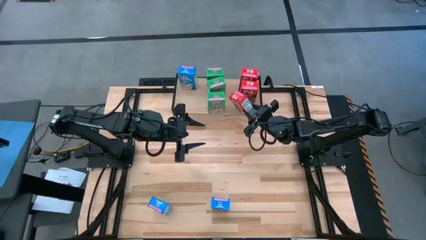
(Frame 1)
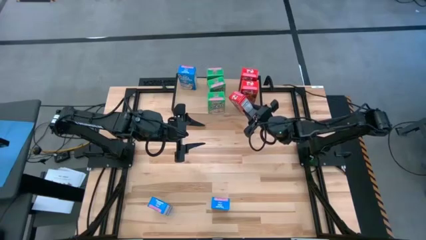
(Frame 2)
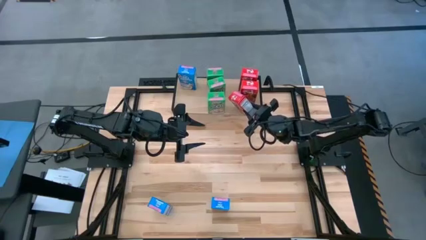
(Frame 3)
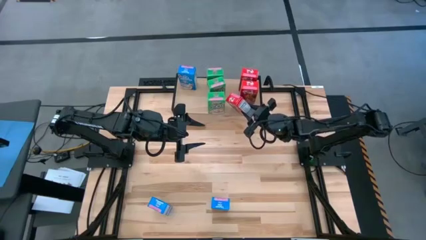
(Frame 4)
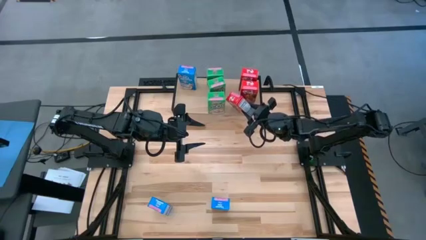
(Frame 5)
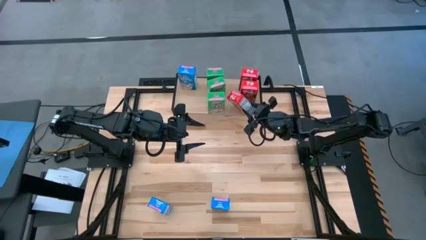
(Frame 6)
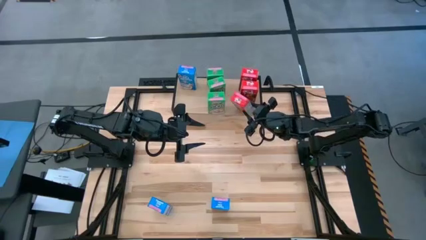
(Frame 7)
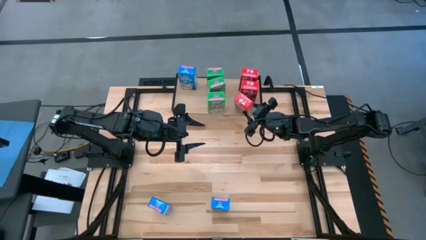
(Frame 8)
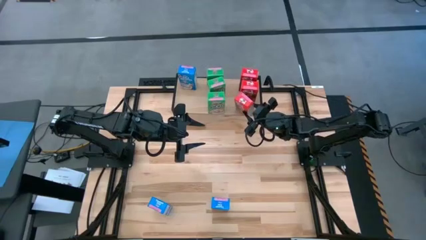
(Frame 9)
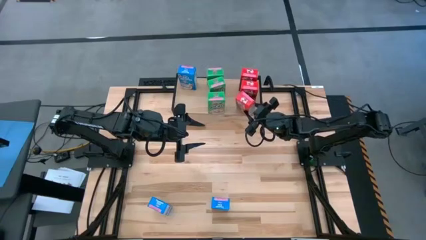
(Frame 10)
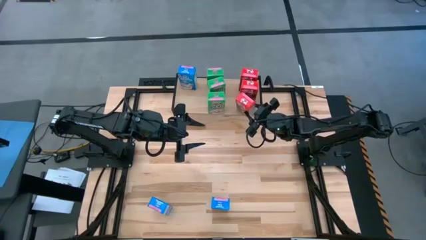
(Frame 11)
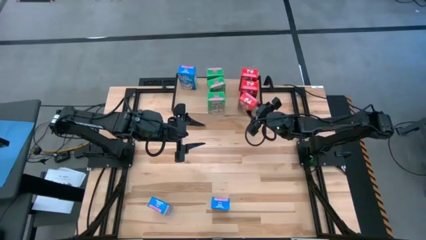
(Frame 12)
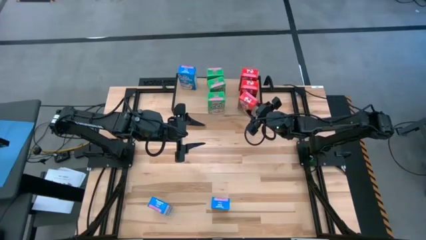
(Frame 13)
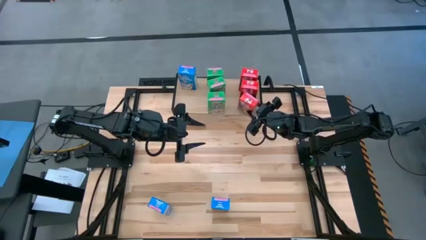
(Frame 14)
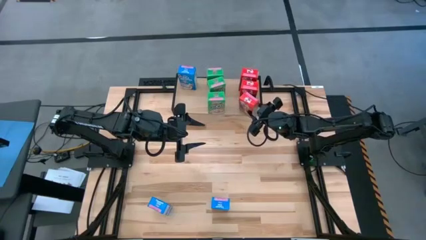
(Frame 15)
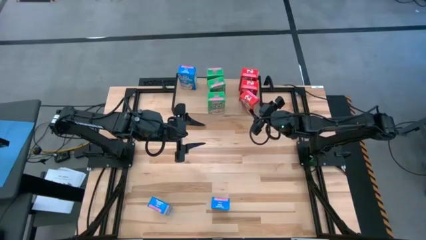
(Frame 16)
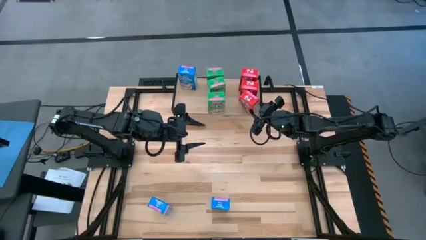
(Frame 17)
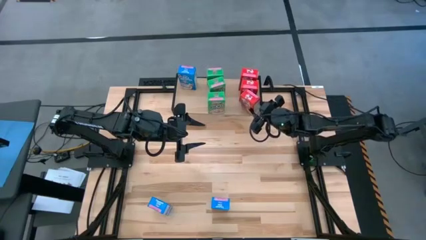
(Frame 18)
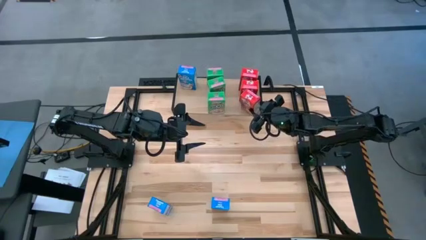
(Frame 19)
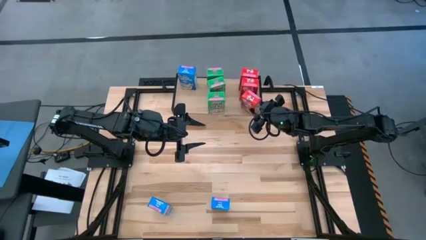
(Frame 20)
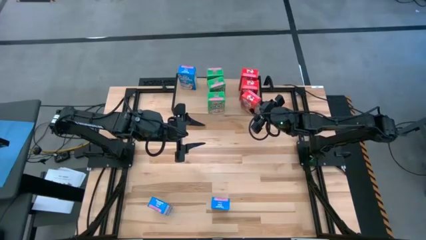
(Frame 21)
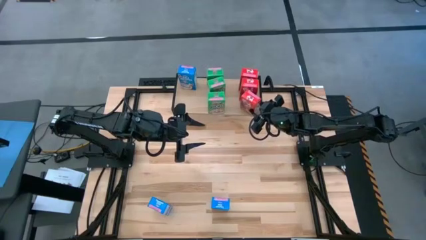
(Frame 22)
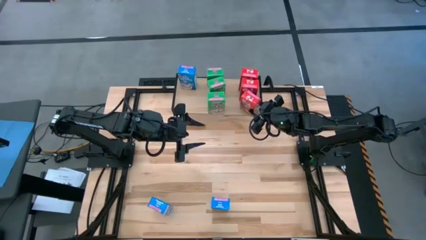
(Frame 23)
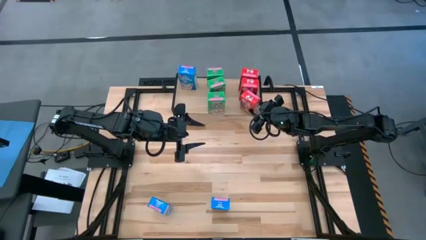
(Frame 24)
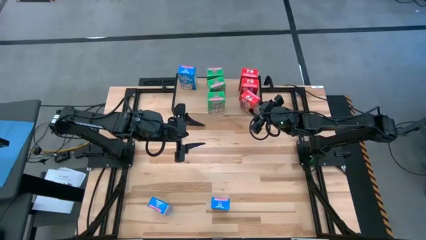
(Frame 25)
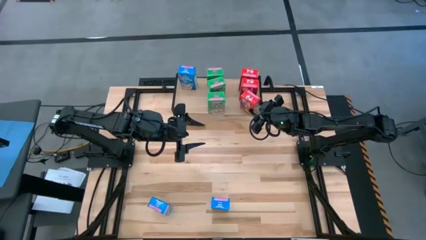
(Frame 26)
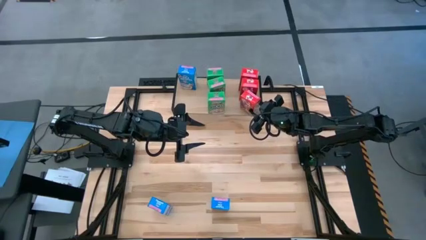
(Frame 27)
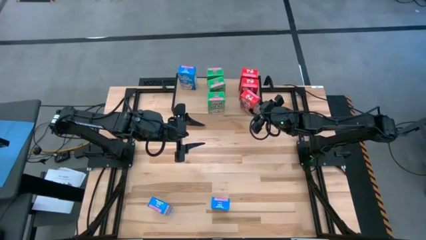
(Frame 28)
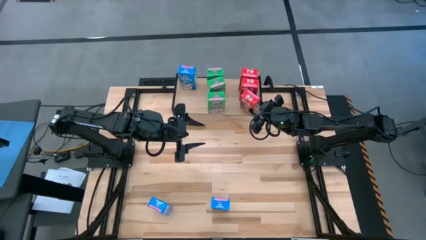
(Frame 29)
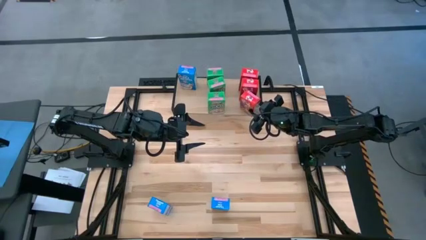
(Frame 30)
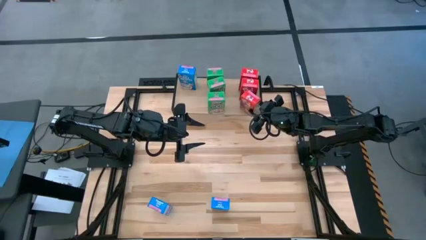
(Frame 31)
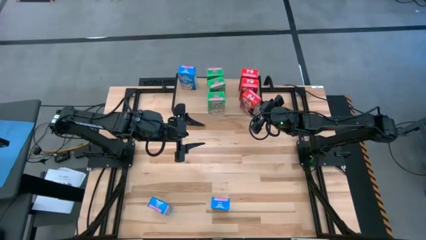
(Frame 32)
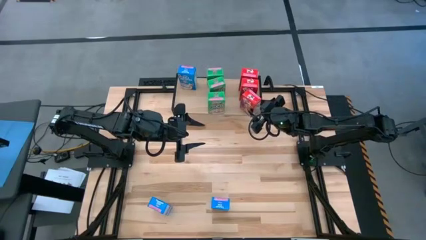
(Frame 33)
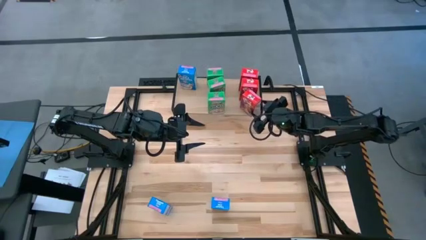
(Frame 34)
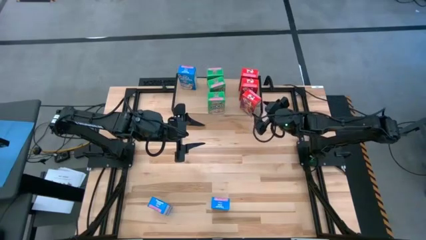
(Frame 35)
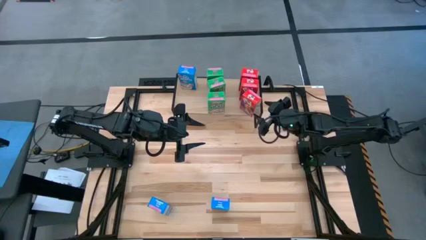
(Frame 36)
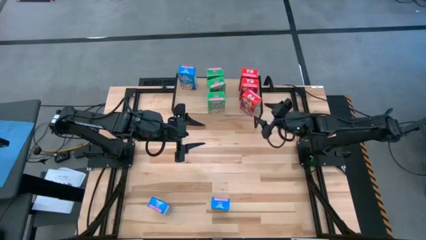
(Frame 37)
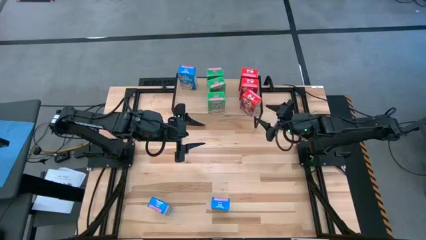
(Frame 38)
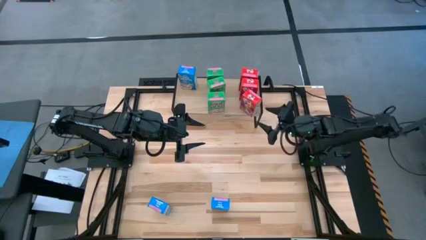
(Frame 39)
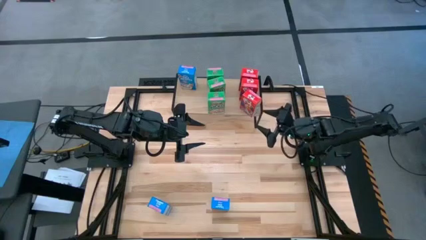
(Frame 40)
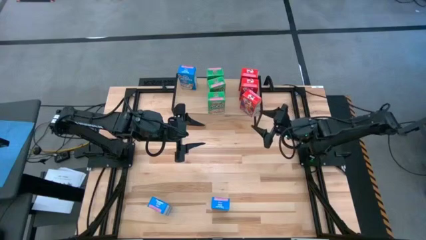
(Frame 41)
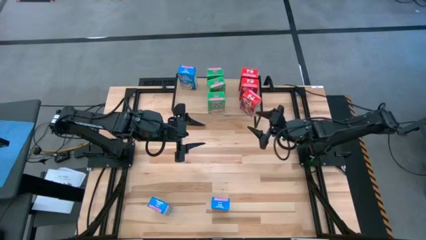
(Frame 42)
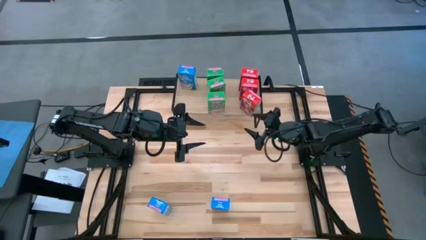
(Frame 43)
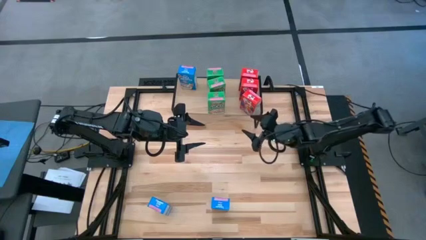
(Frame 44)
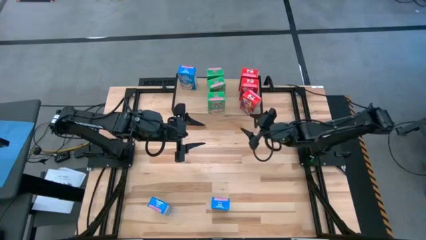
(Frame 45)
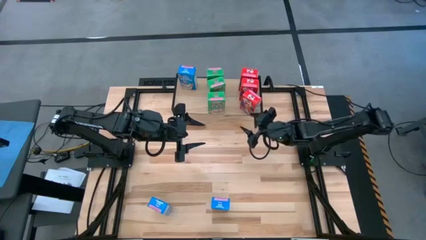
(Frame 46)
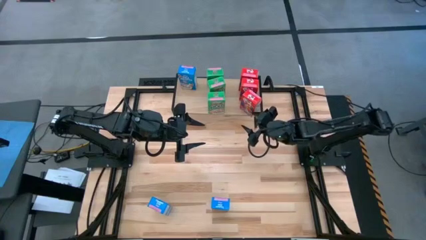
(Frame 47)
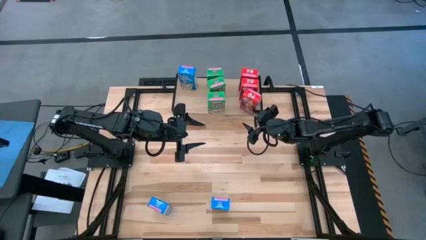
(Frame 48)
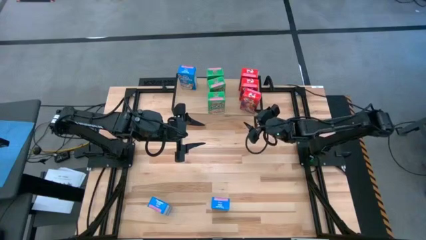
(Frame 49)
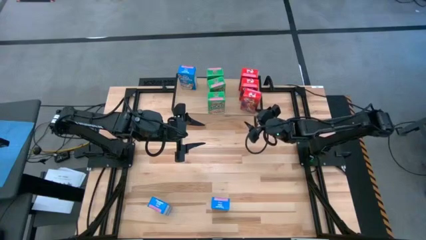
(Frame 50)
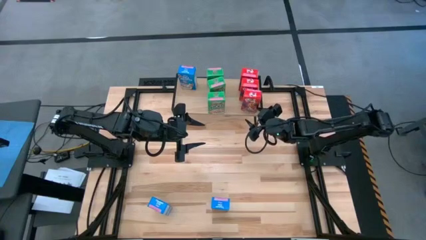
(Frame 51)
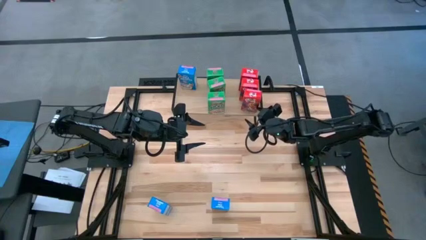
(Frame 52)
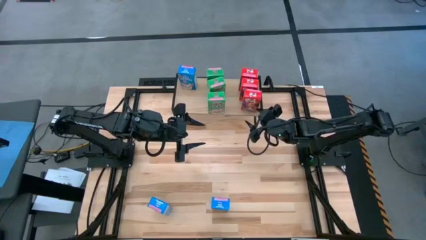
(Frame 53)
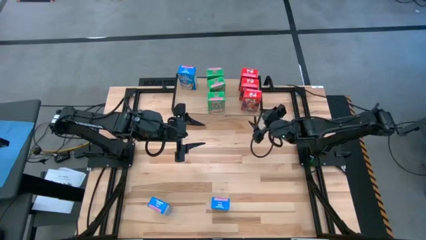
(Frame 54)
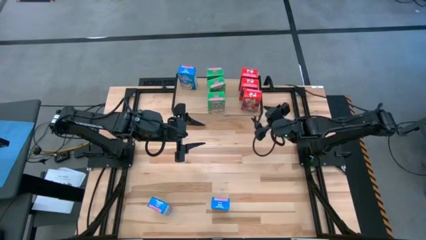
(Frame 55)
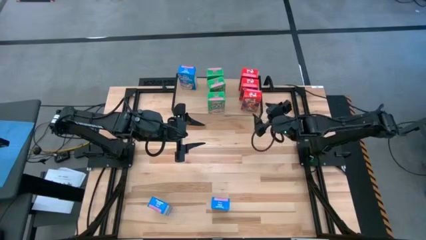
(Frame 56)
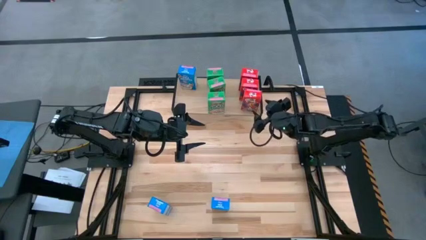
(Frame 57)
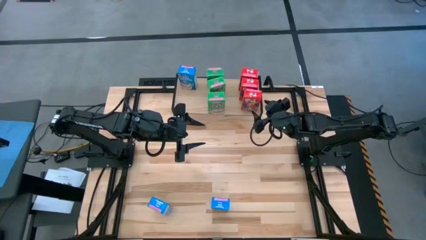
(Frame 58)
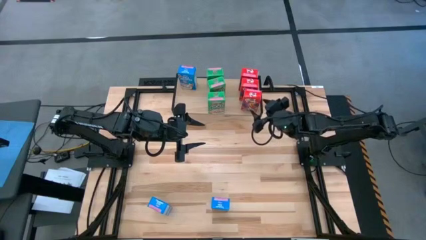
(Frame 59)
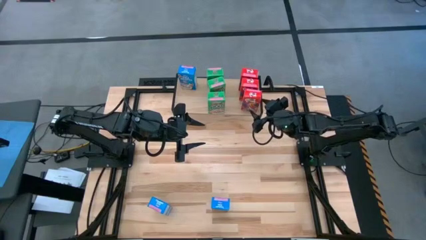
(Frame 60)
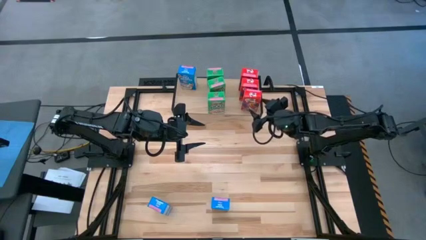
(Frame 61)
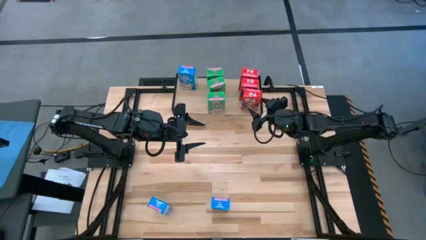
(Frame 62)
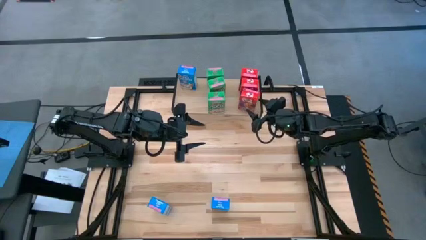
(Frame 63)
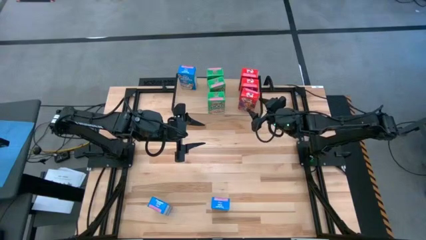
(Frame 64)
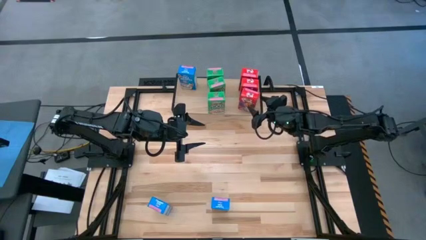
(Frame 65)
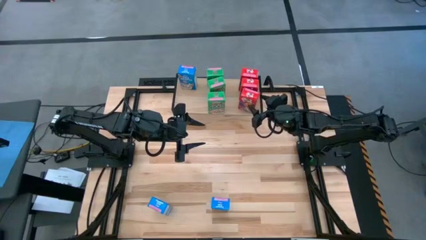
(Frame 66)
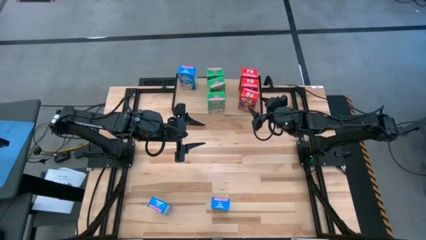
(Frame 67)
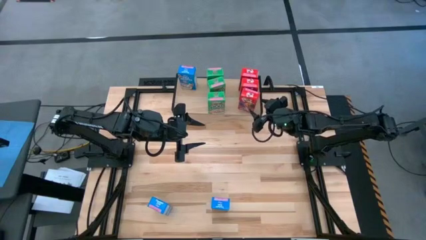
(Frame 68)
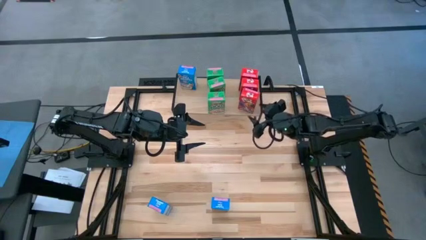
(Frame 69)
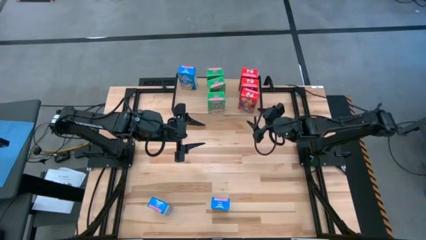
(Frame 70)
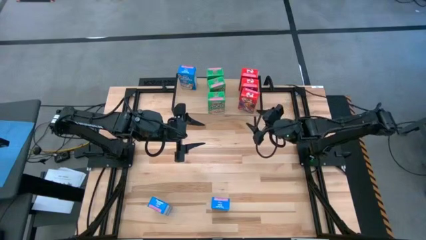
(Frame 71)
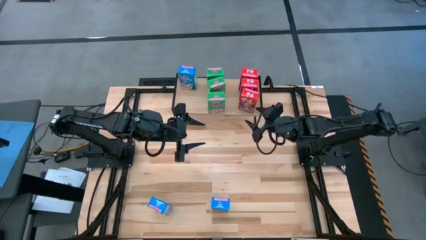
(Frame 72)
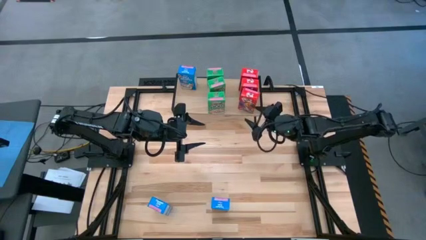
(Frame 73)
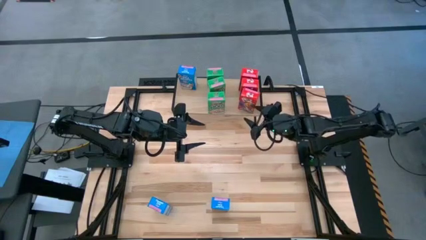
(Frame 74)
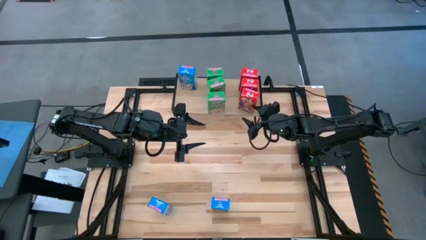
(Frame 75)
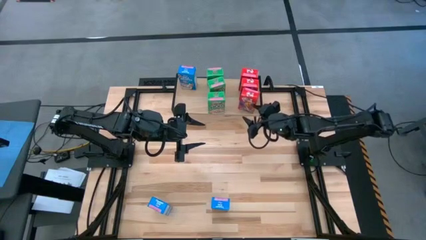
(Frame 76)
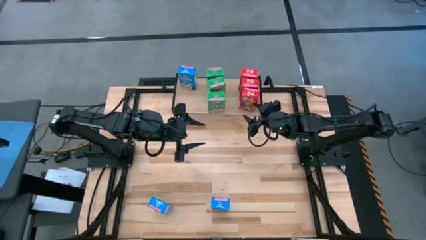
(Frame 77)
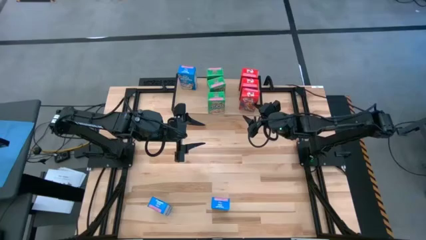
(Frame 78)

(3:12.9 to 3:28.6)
Task: Stack cereal on shelf
Put the red cereal box on the shelf aligned with the red cereal boxes

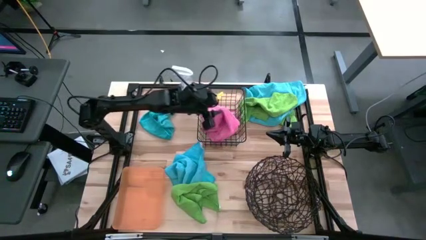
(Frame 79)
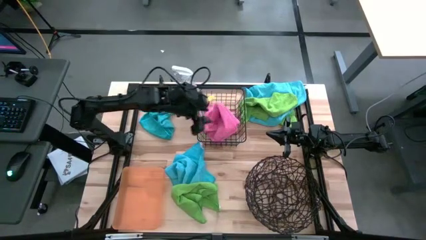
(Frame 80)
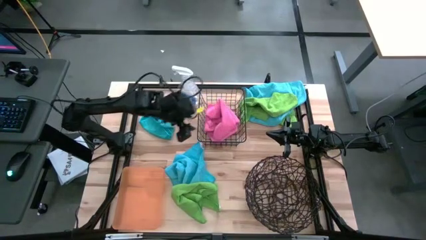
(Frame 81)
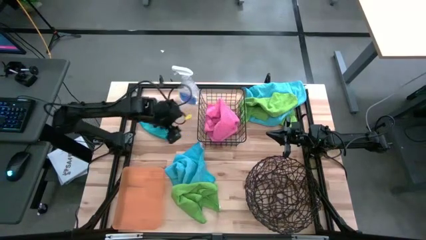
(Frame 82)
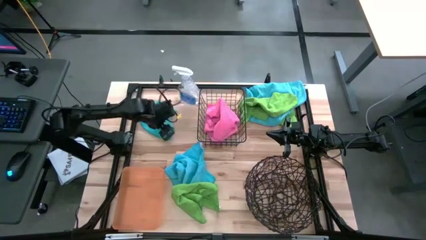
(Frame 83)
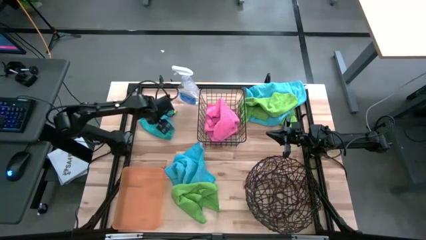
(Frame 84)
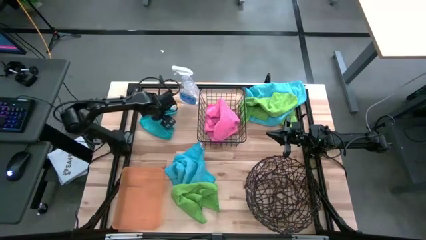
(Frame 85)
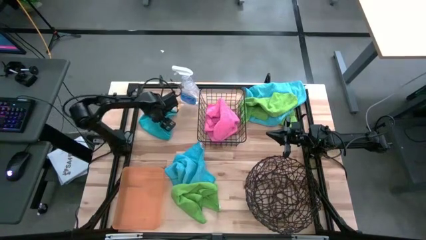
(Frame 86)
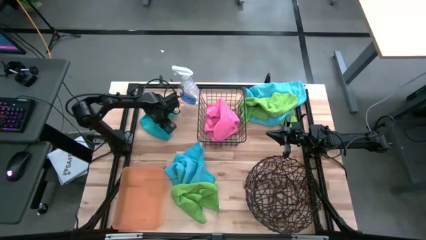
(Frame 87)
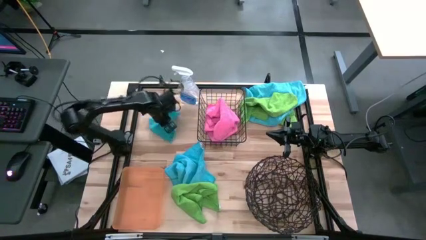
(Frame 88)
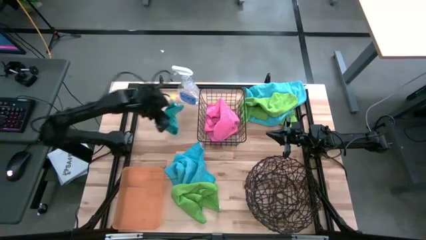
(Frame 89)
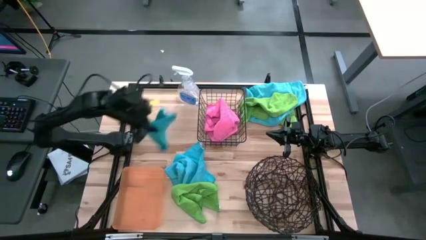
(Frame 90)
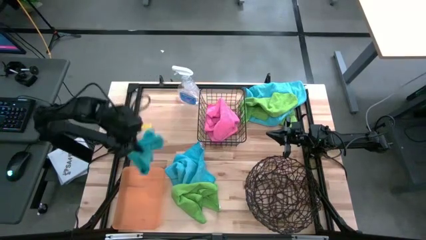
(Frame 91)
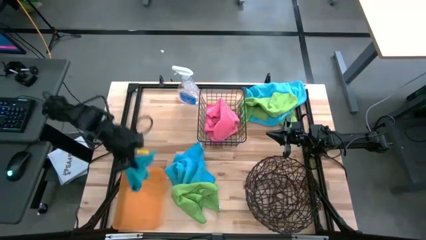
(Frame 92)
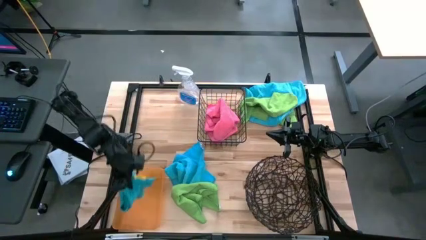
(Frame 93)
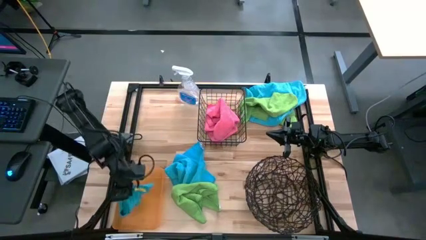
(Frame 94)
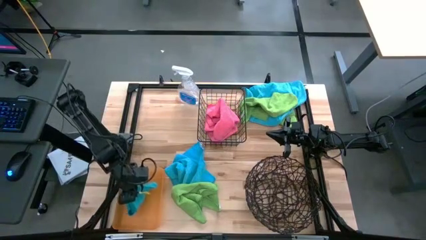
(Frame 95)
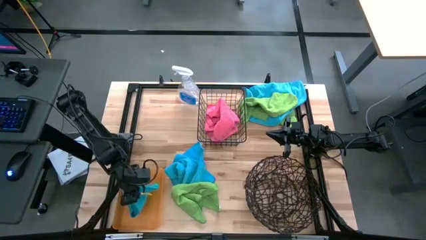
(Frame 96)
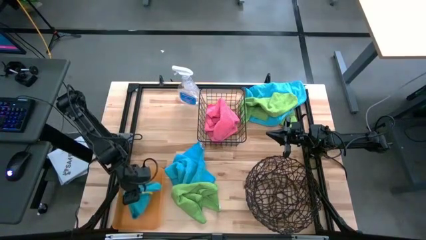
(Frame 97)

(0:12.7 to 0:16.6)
Task: Sort microfiber towel by color & place in baskets
Put the blue towel into the orange bin
